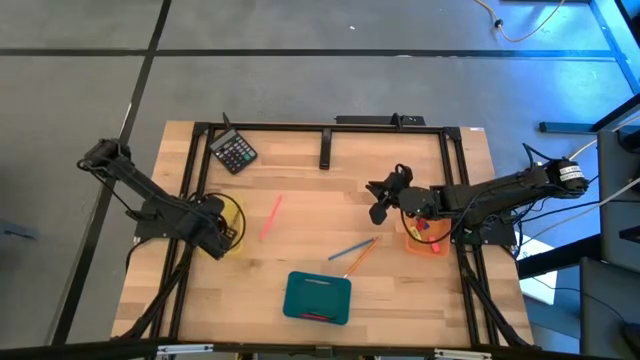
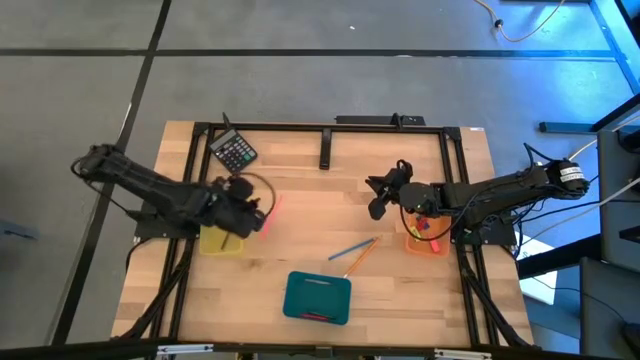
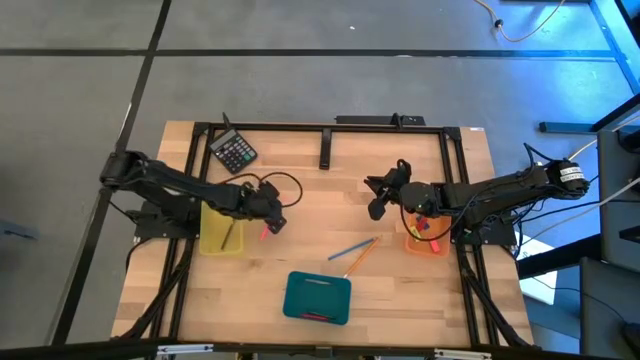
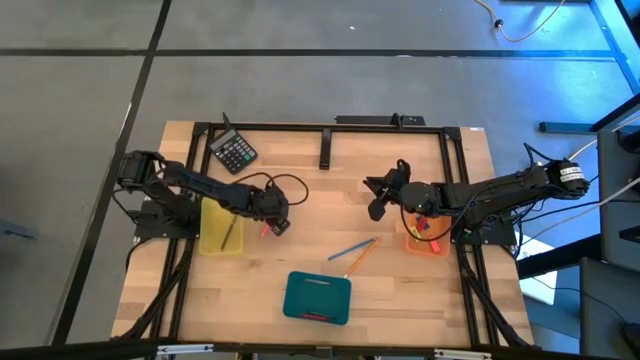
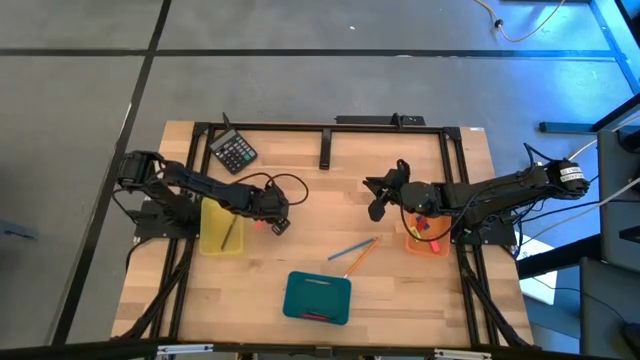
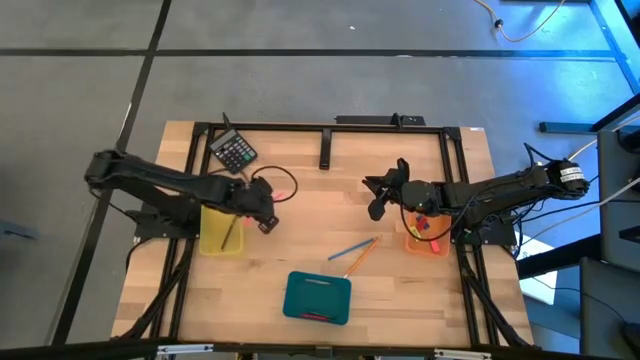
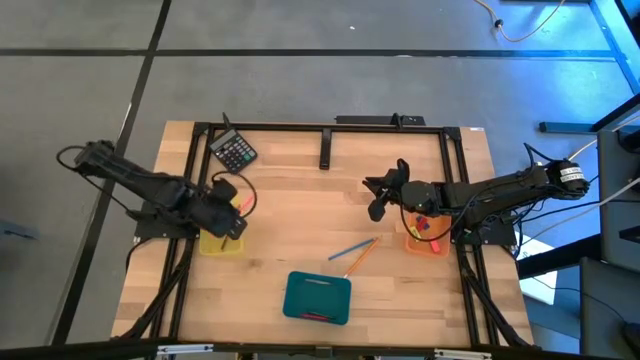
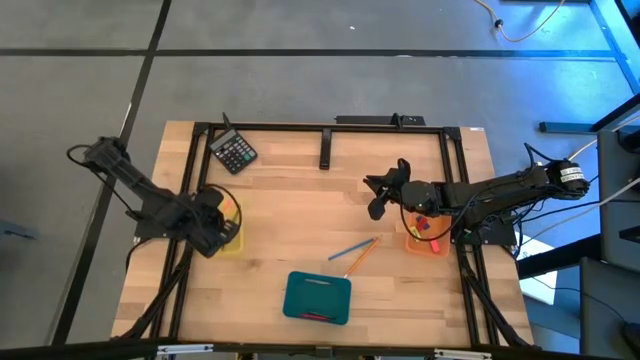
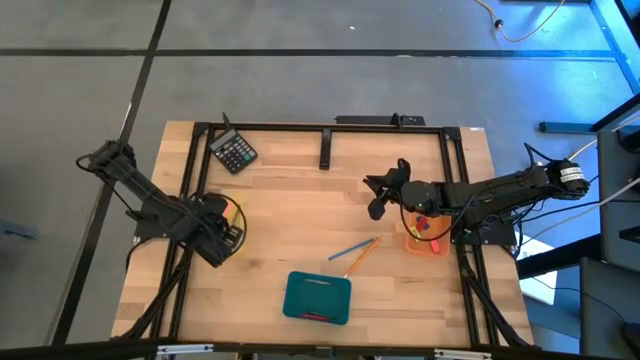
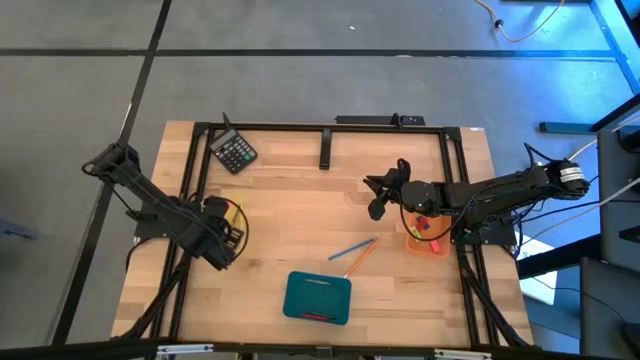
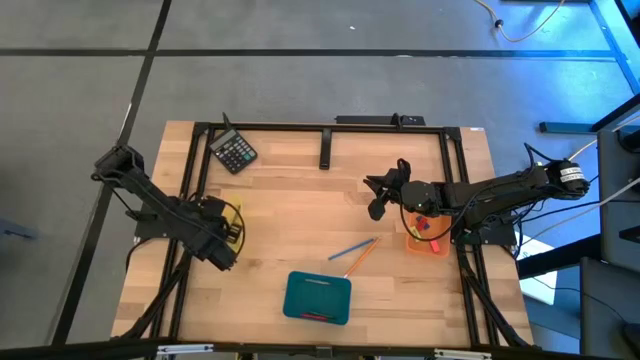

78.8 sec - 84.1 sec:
Task: Sort crayons/erasers/pens/pencils in bins
Put the pink colored pencil into the yellow bin

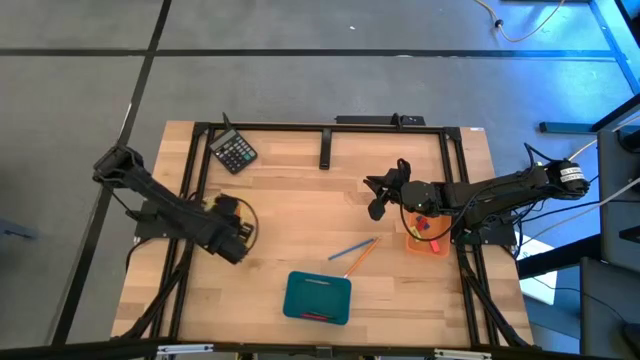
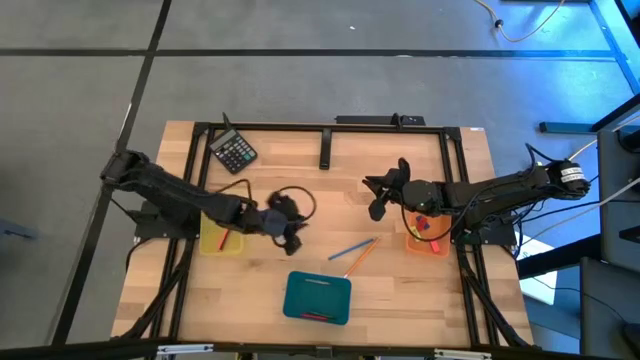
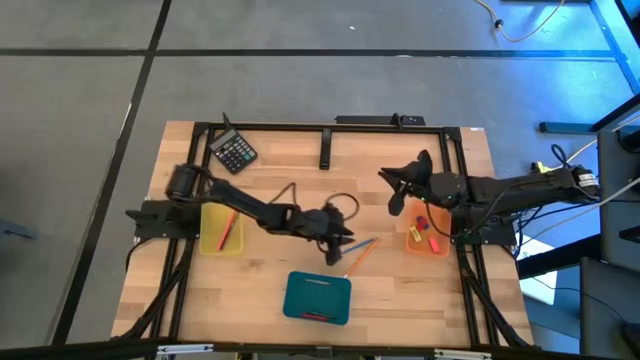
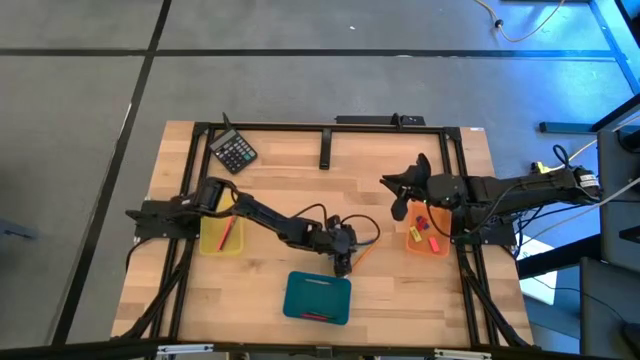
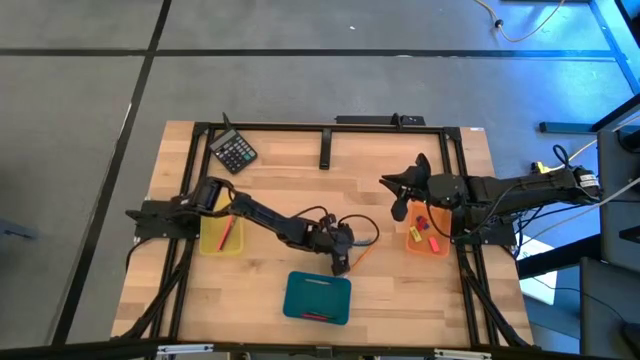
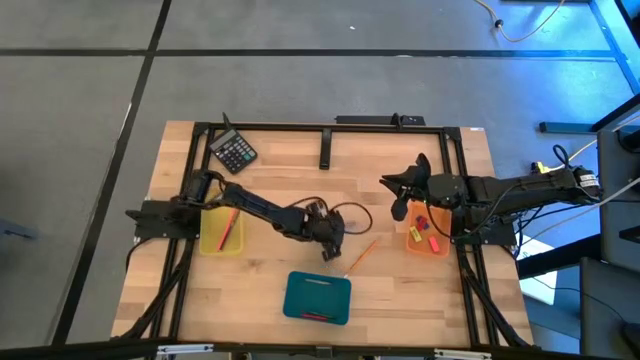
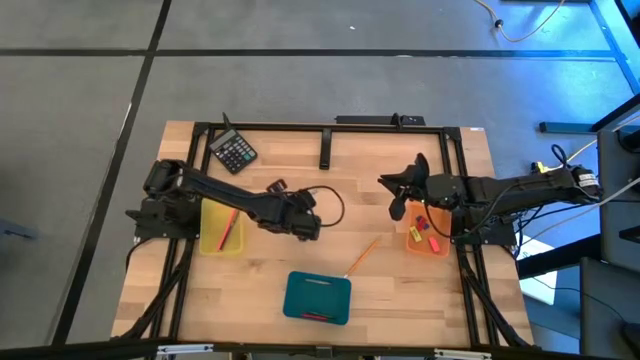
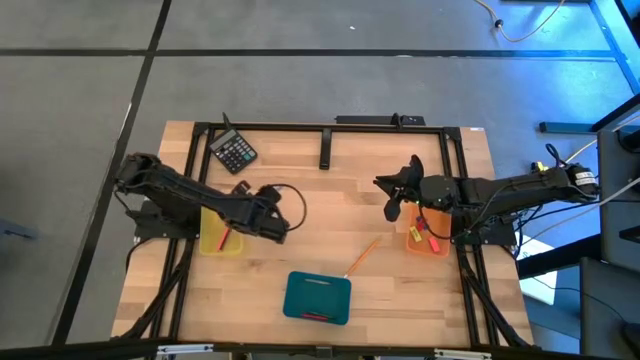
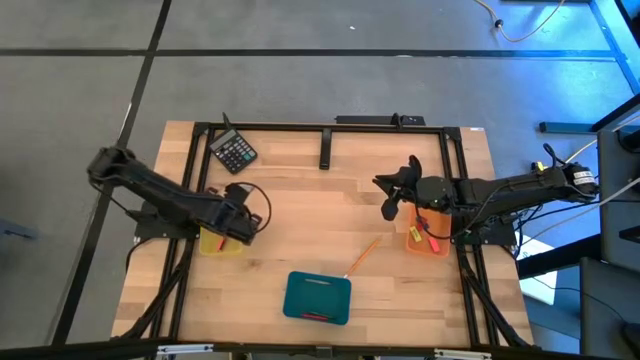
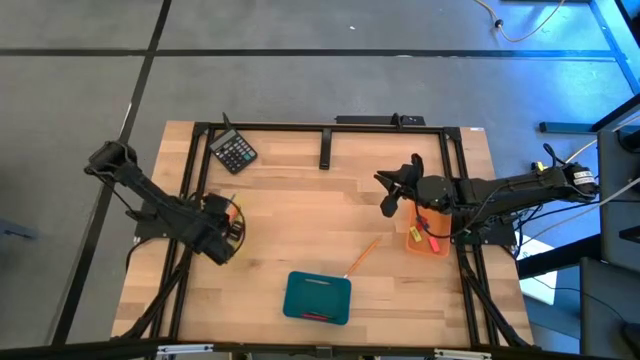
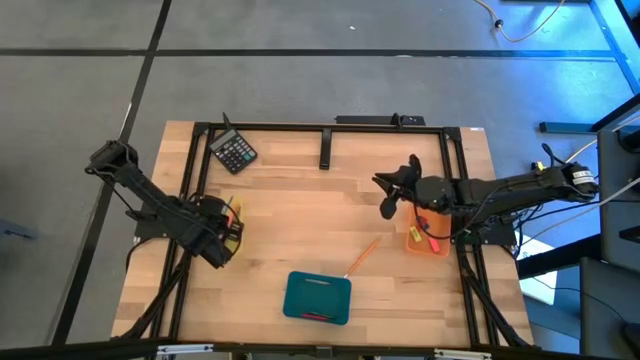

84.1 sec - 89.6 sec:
Put the blue colored pencil into the yellow bin

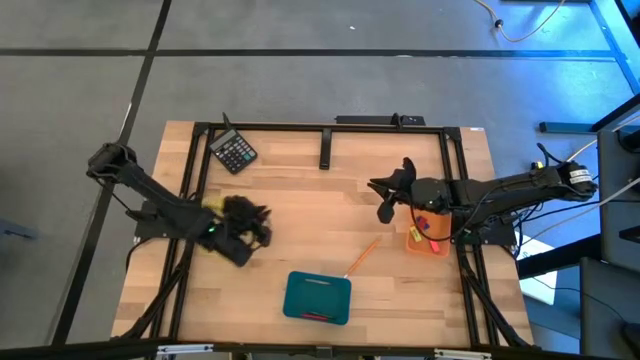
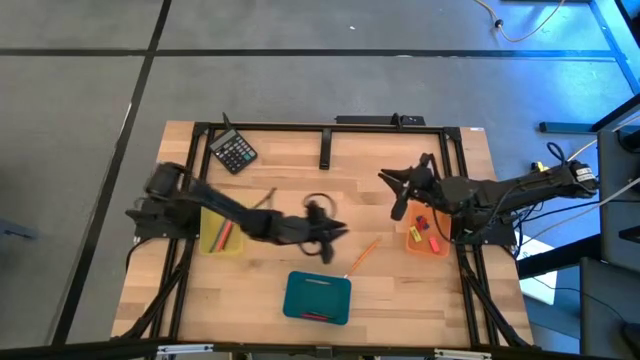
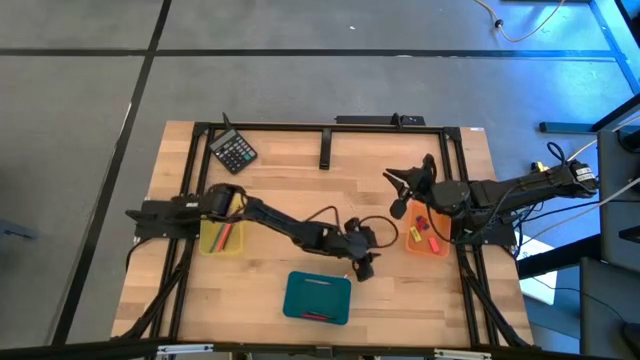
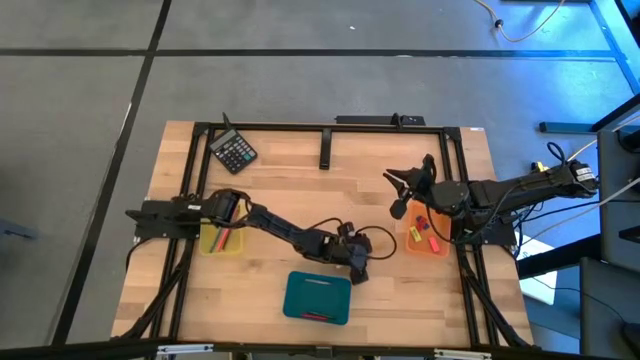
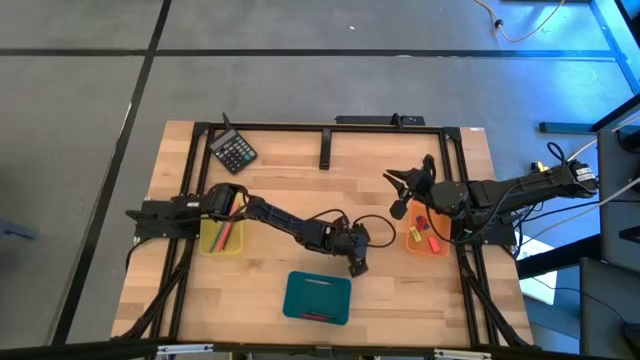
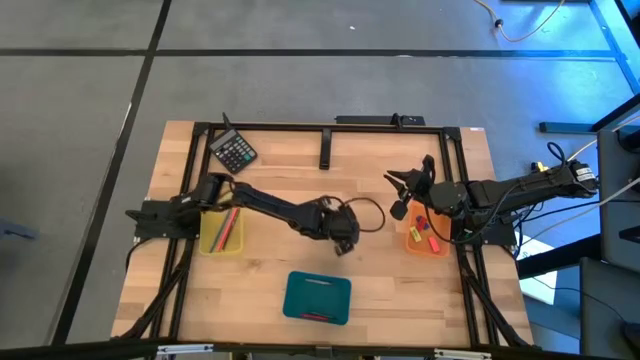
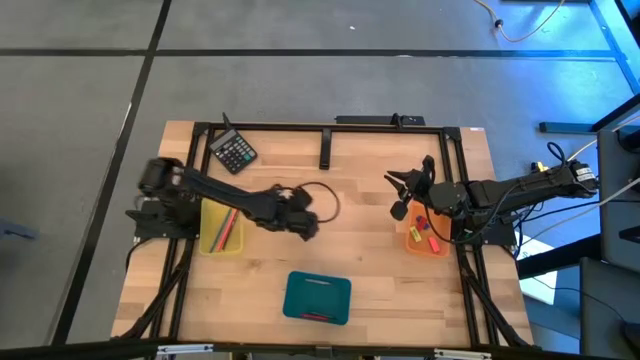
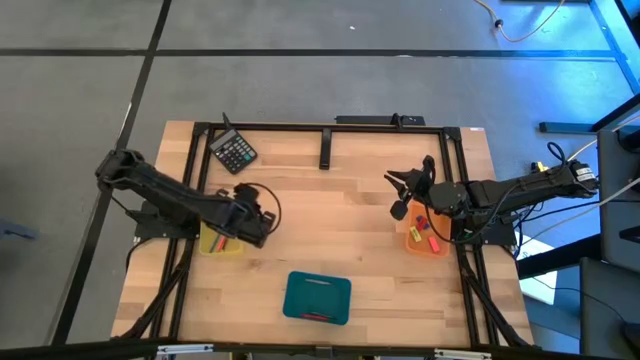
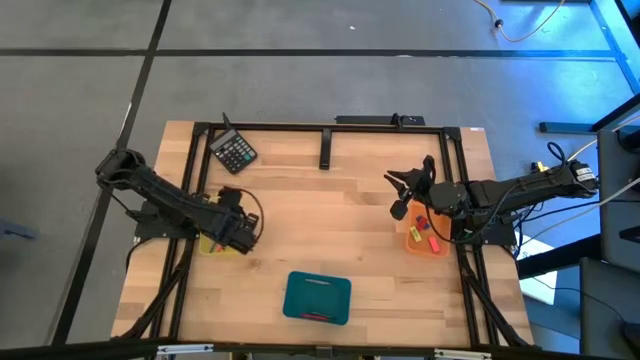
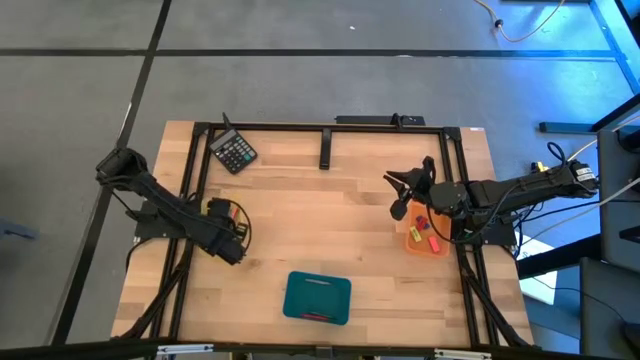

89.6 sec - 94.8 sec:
Put the yellow pencil into the yellow bin

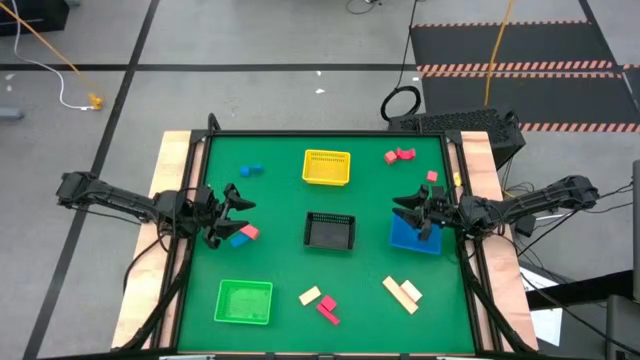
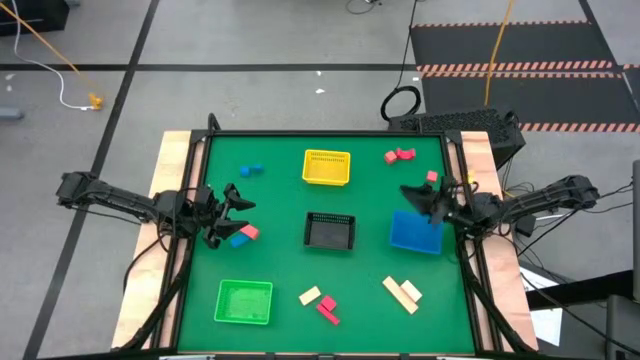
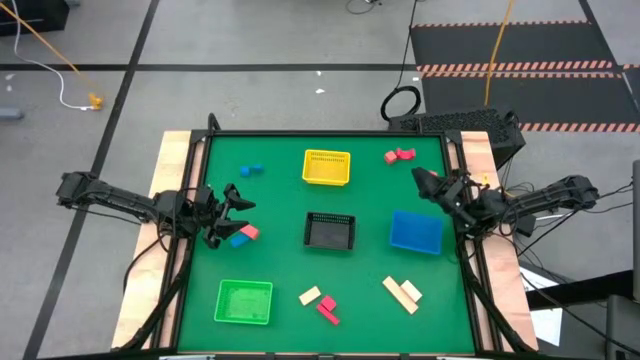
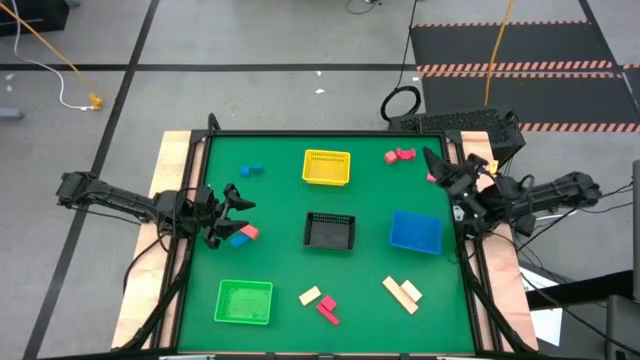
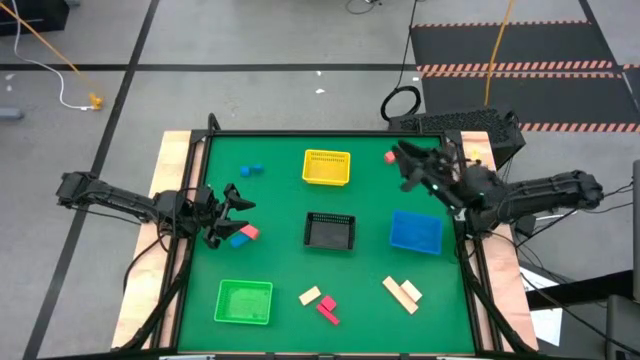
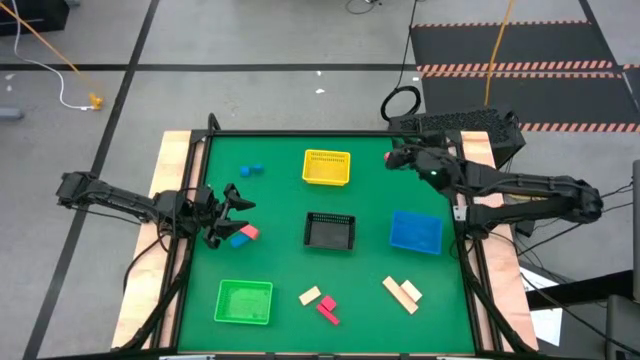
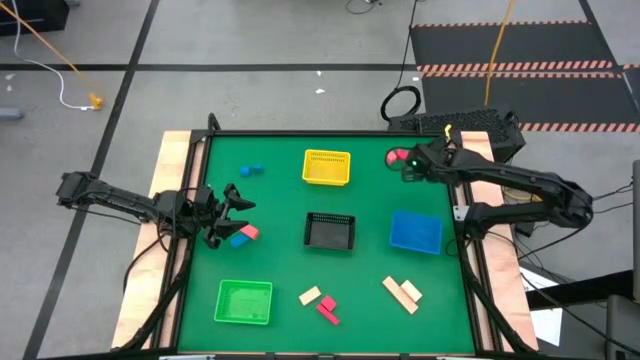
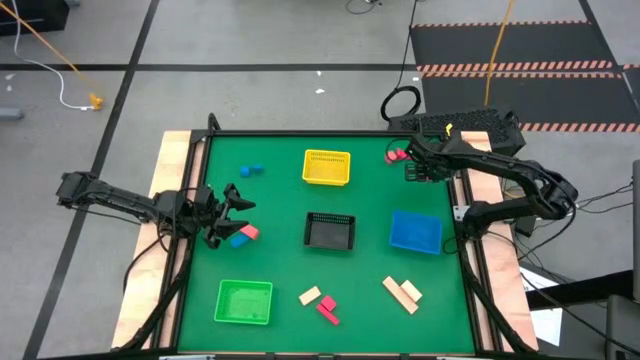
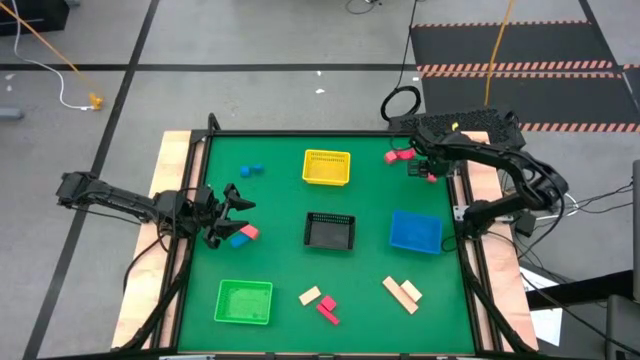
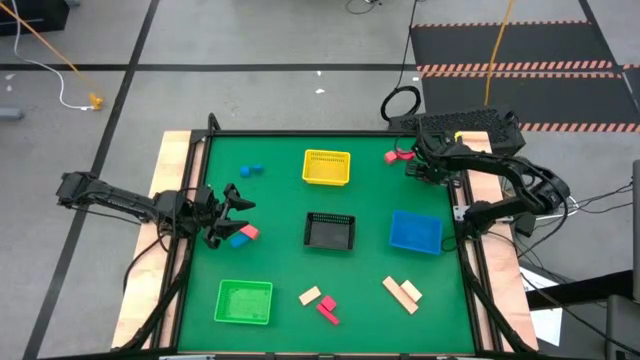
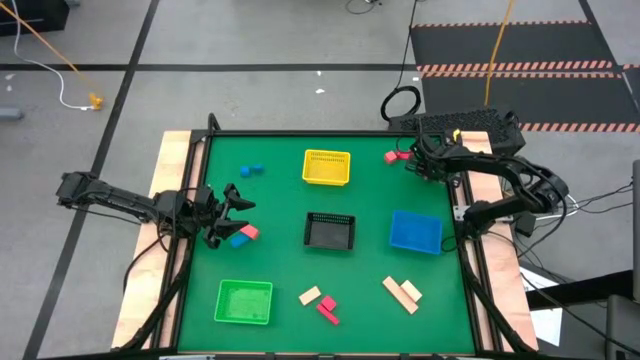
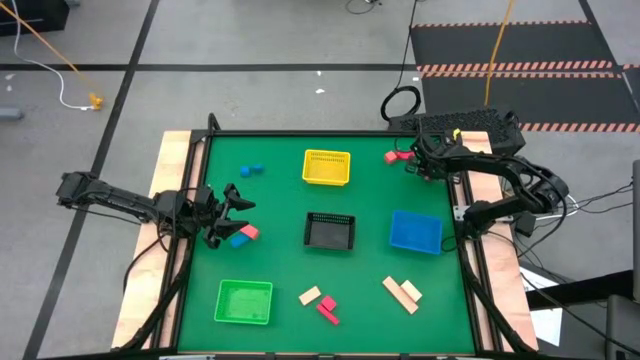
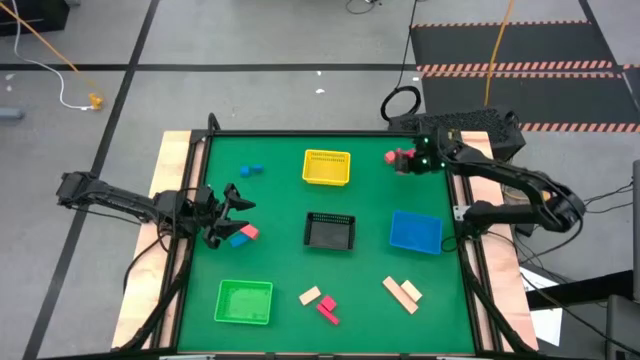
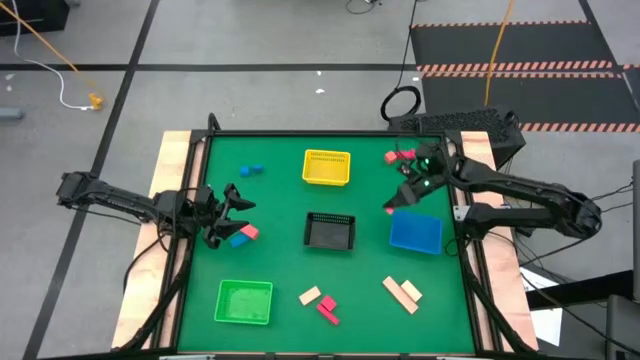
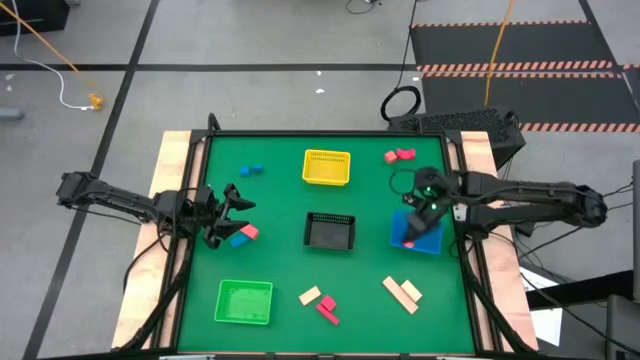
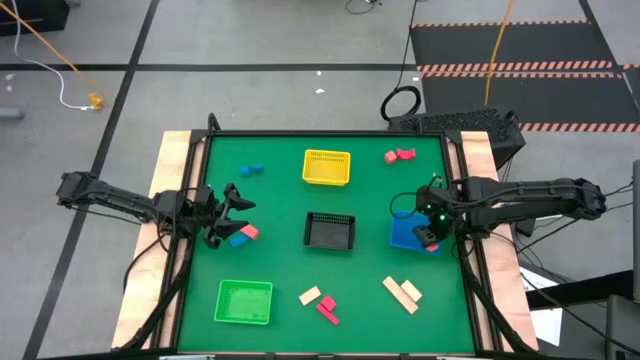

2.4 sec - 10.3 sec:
Task: Sort & place blocks by color
Put the top left orange block into the blue bin
